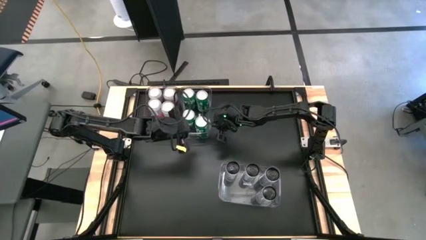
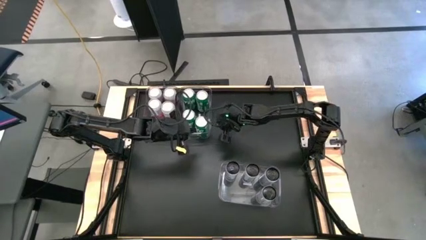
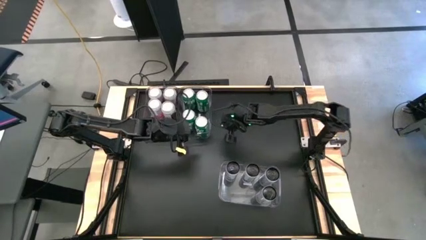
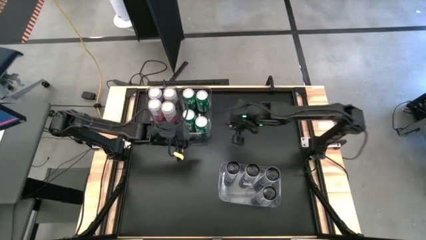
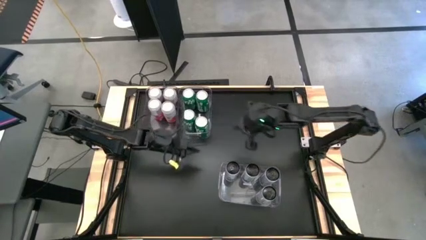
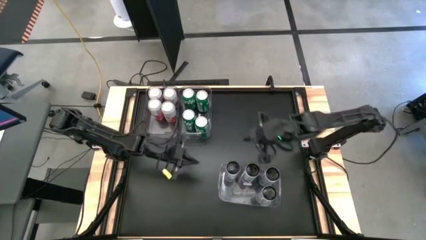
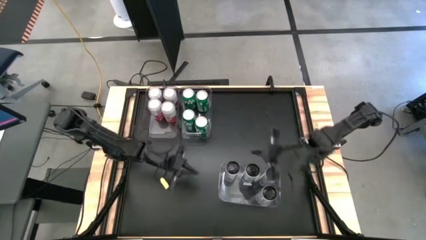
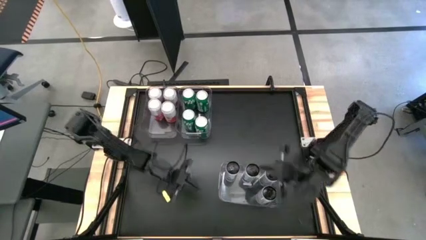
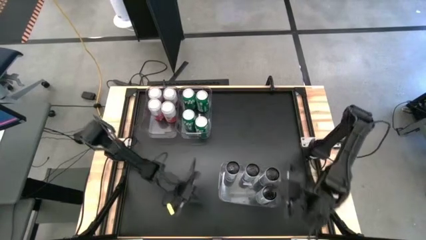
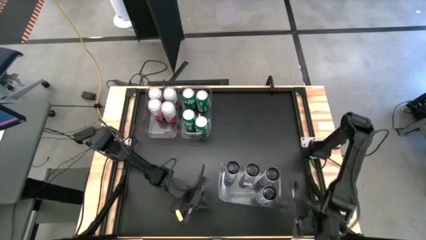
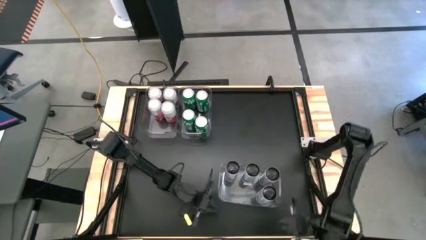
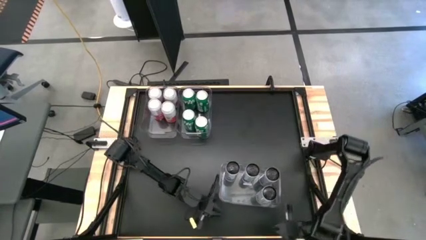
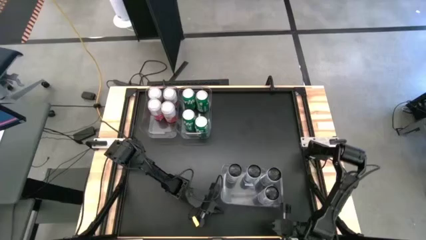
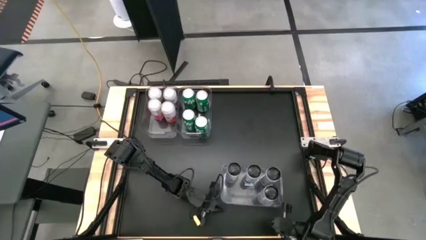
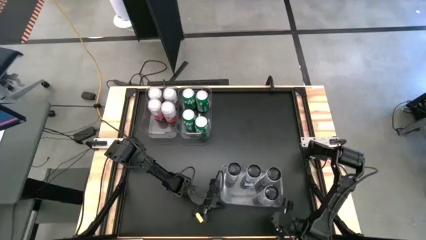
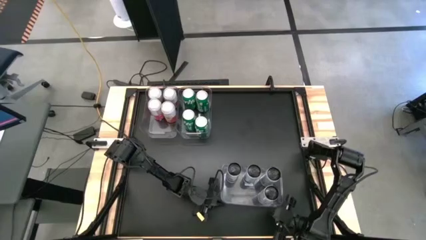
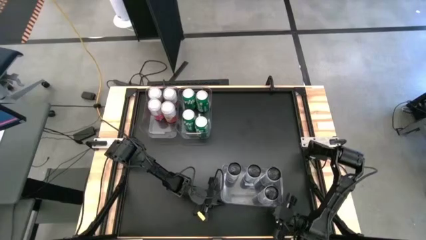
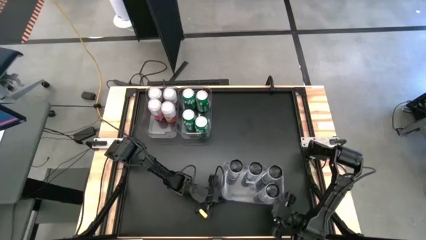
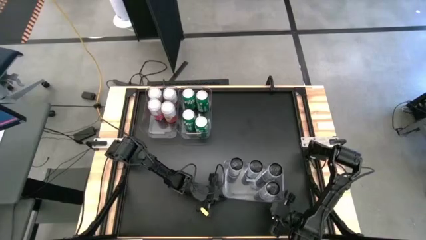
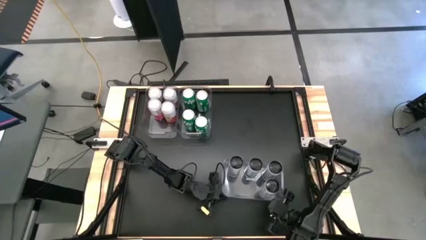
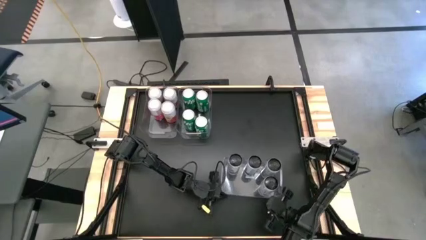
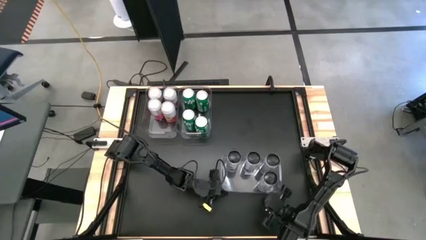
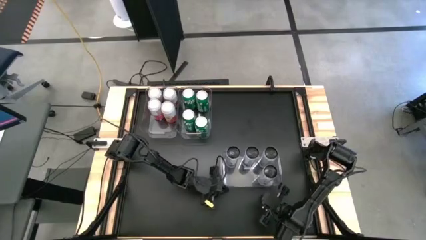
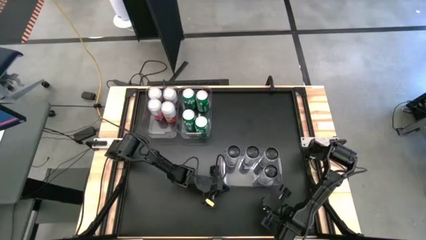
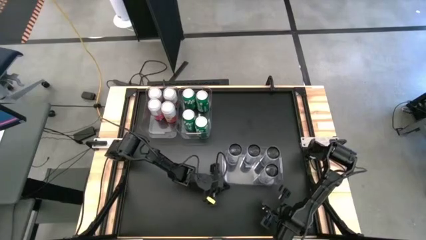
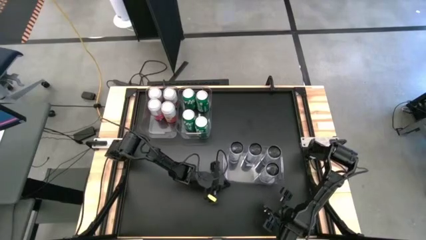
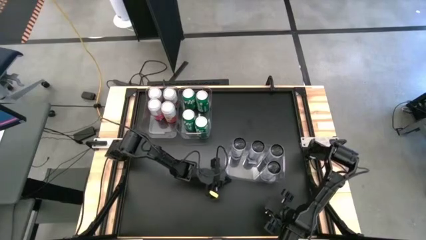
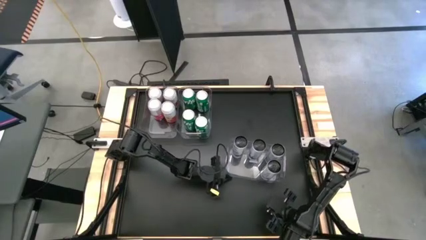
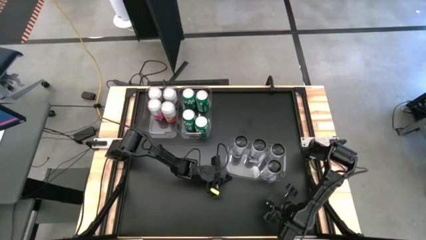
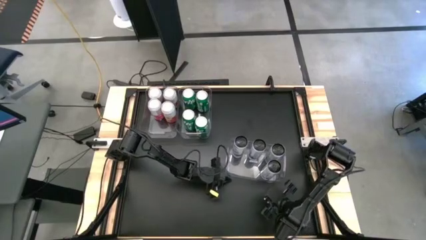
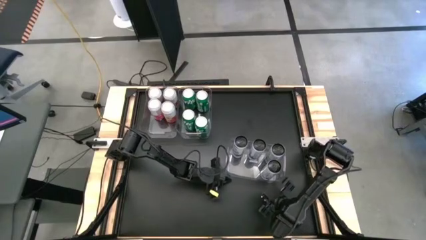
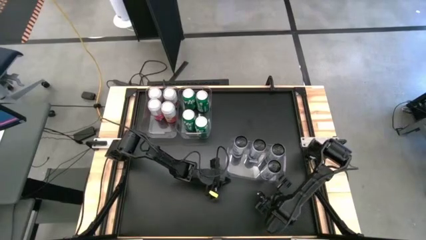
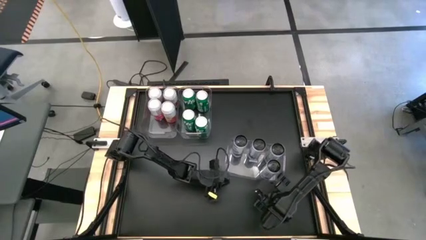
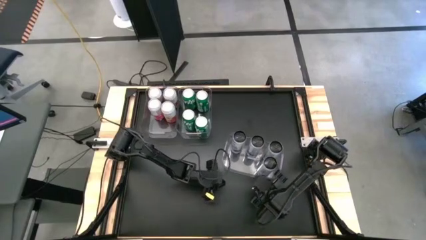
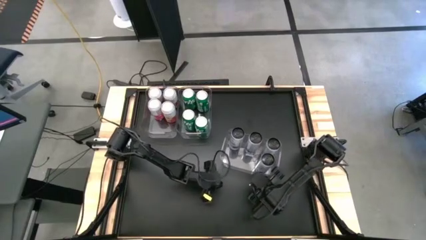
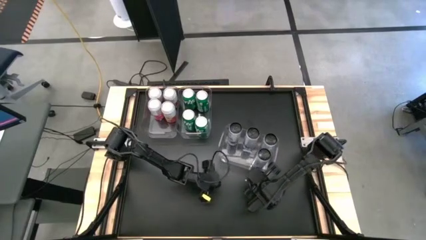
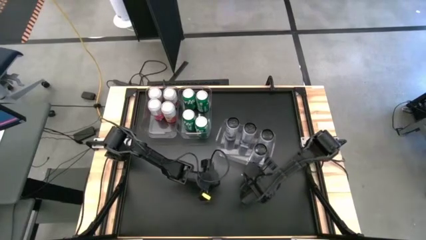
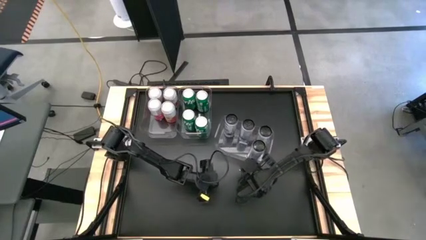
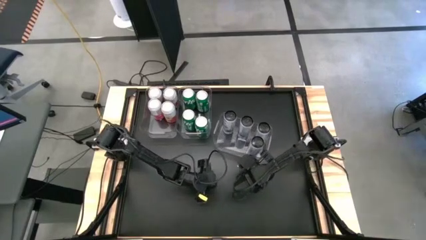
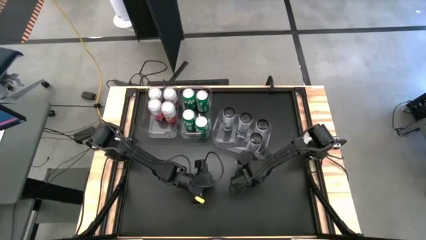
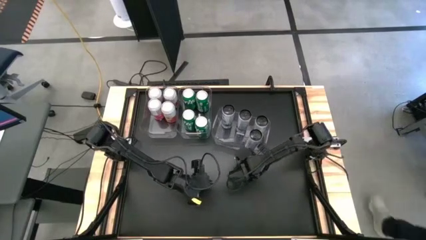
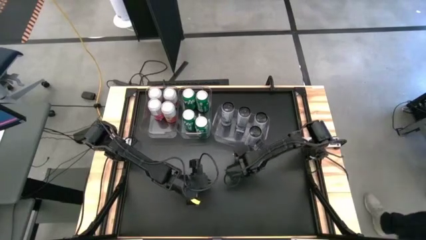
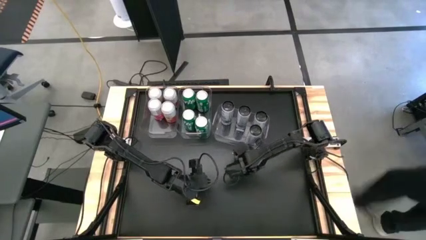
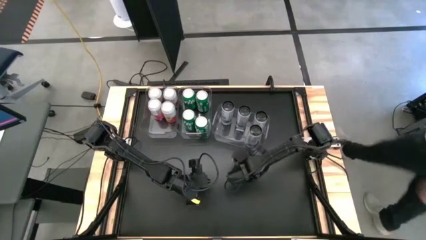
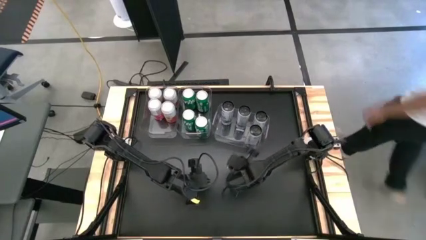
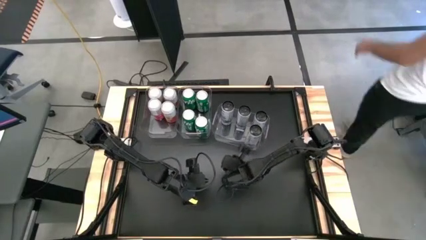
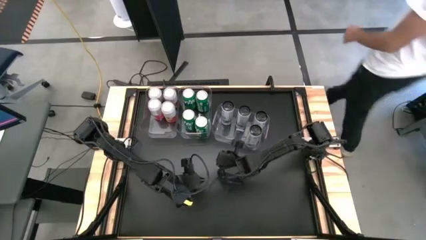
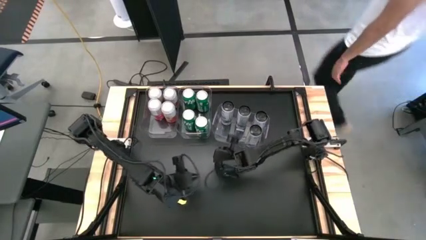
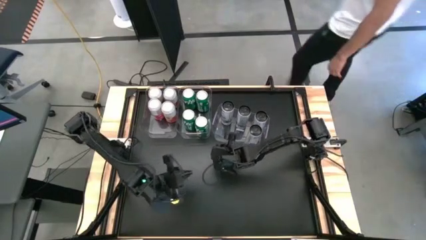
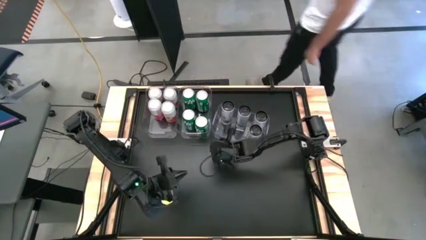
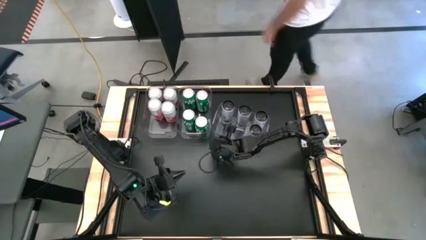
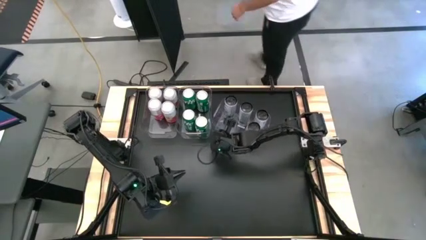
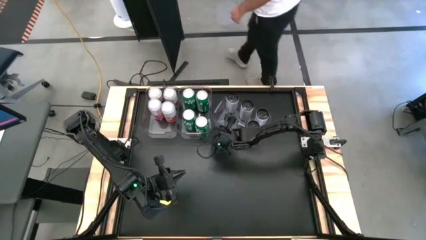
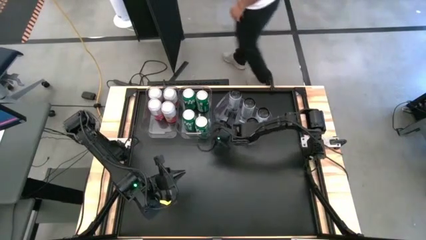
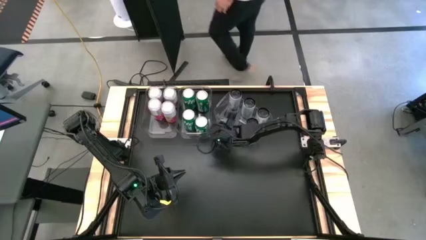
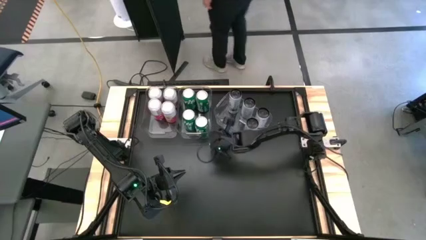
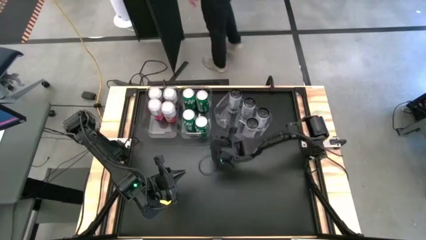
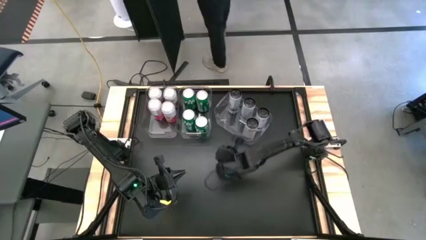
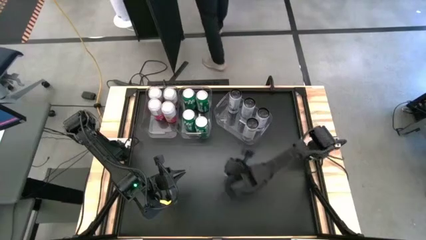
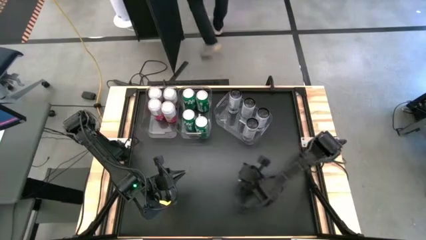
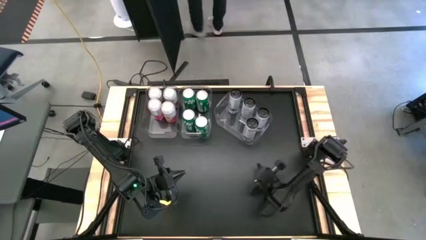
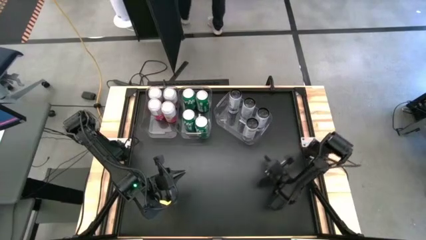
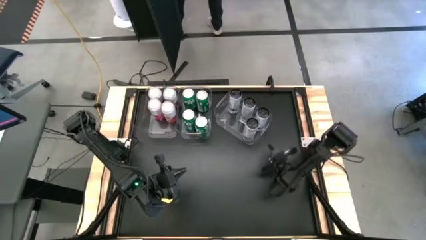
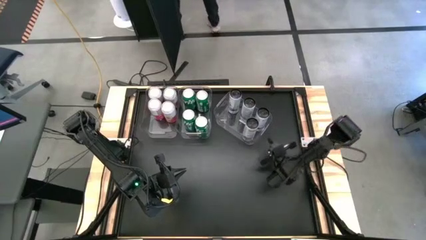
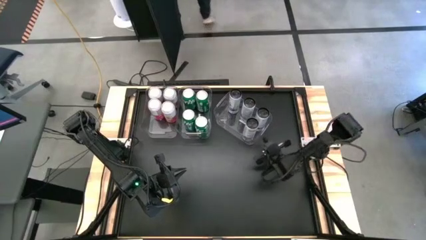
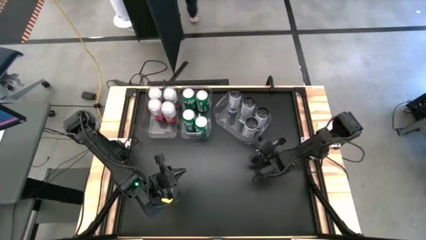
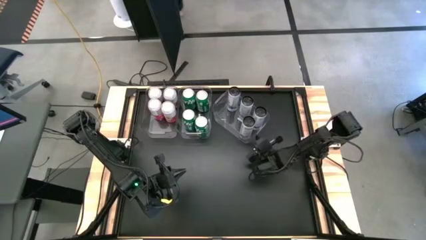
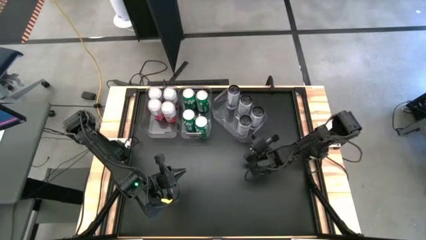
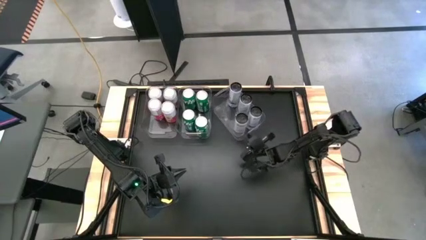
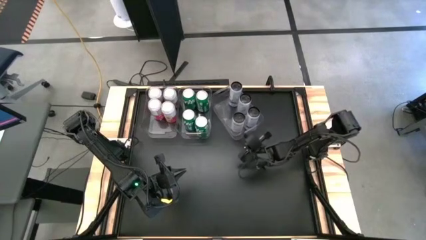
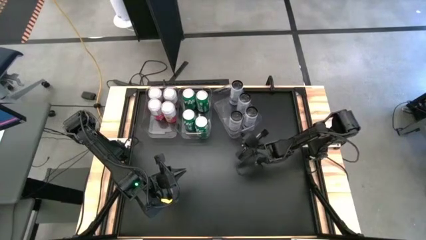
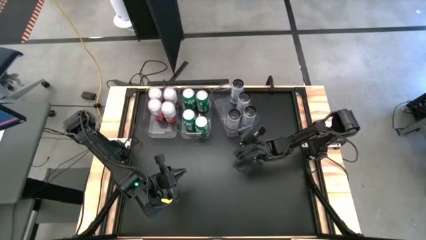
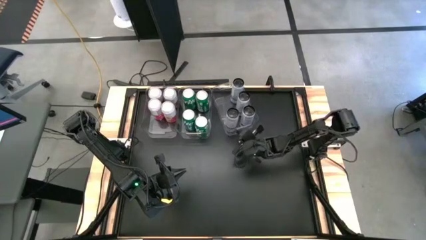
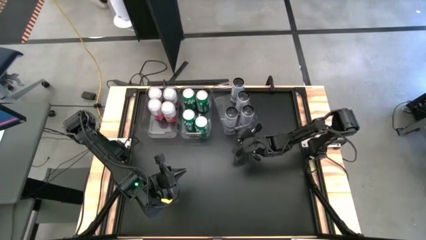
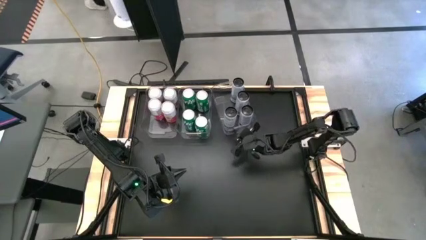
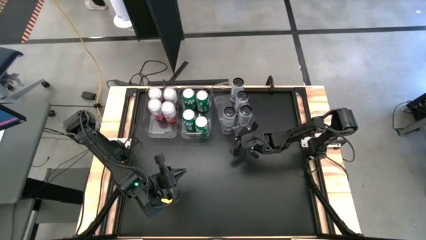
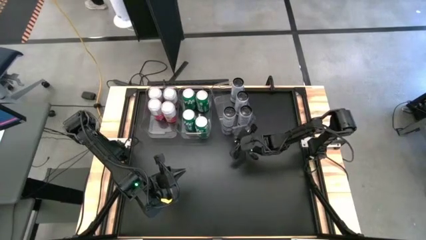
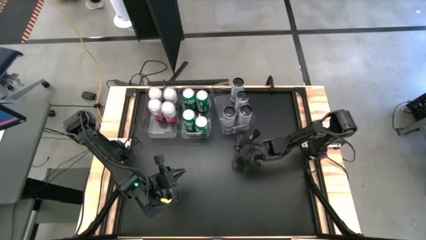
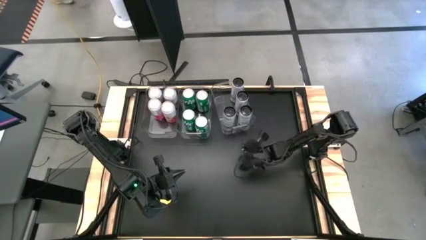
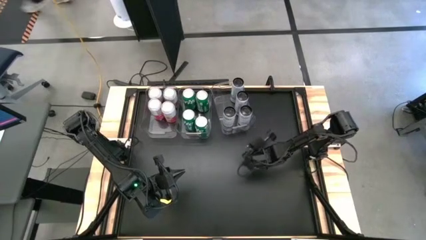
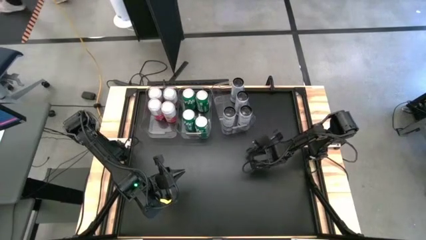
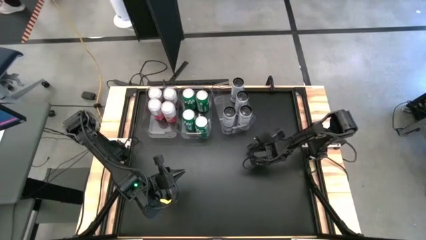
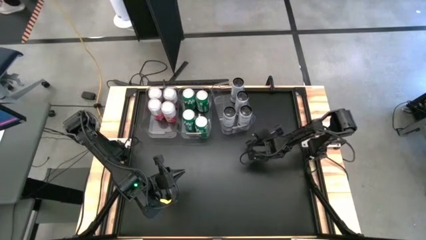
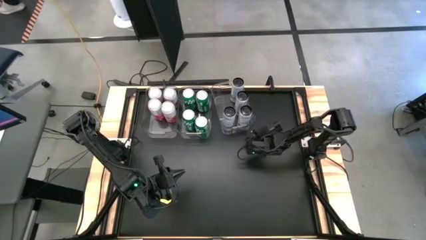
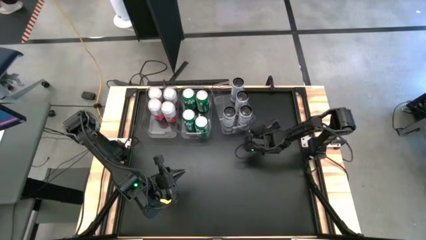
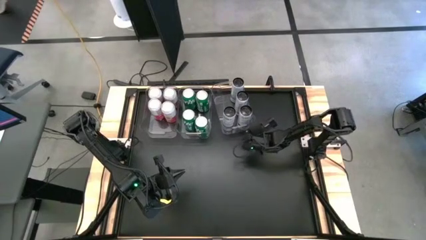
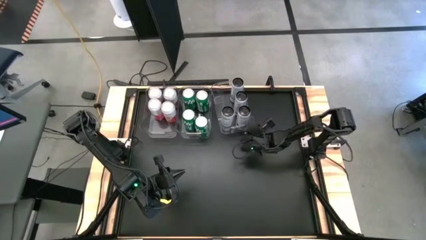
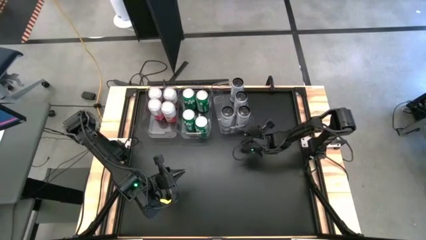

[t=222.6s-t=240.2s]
Task: Sort soda cans
Move the bottom transparent bin to the right side of the top left transparent bin
